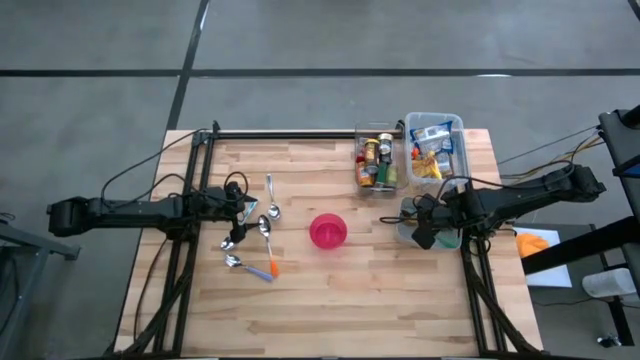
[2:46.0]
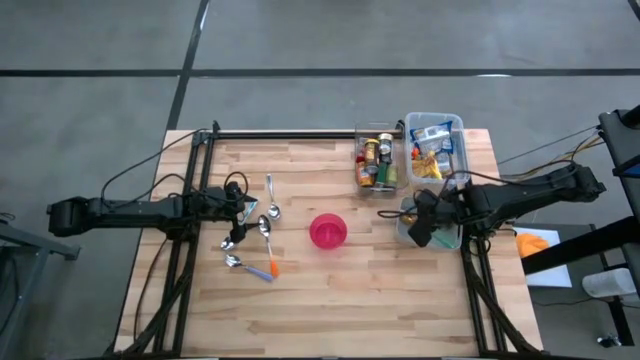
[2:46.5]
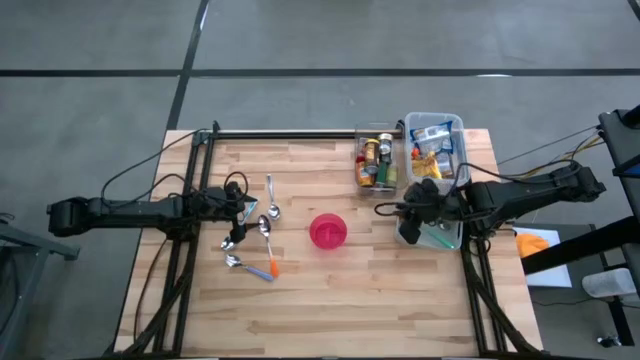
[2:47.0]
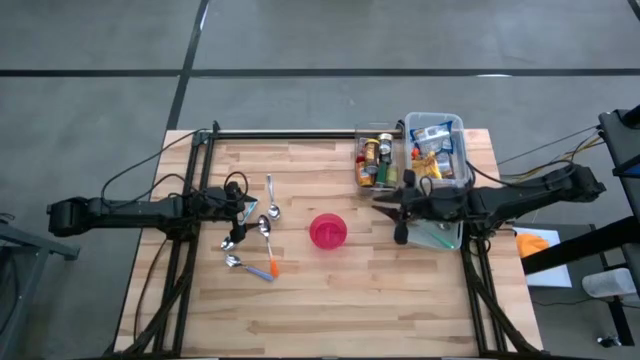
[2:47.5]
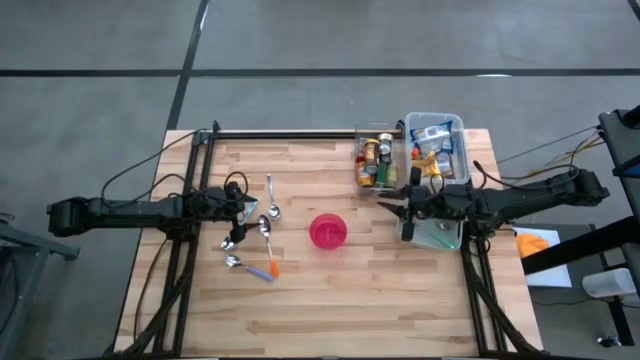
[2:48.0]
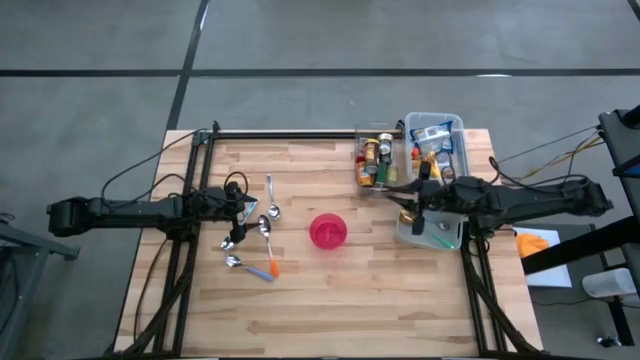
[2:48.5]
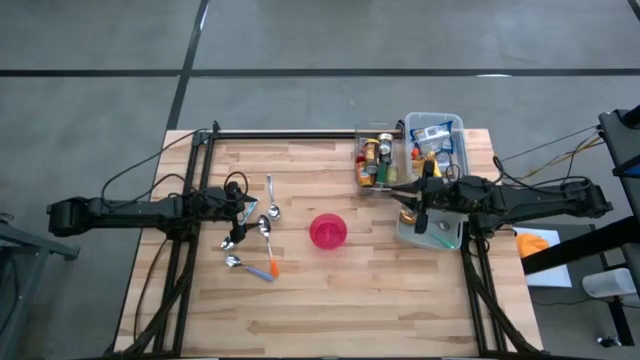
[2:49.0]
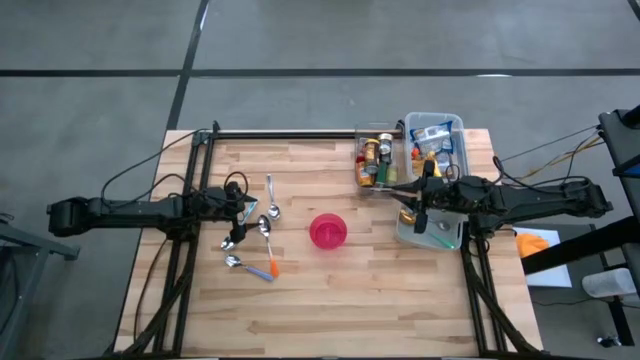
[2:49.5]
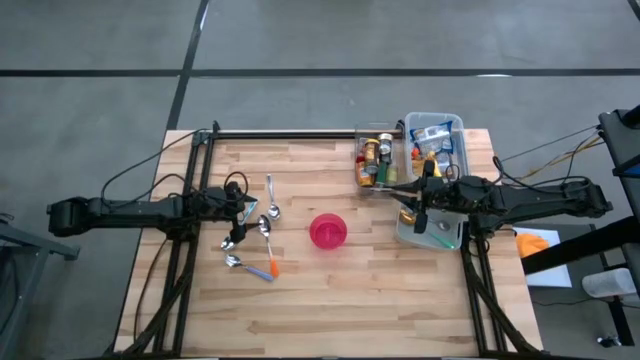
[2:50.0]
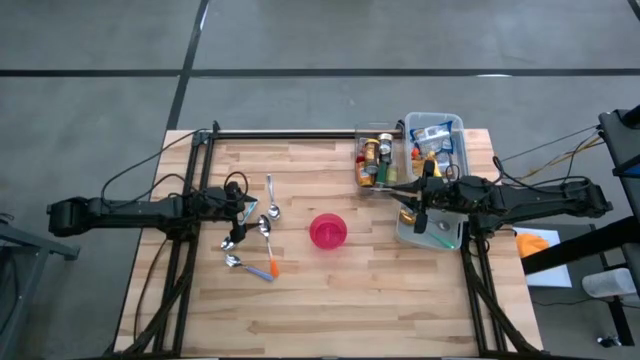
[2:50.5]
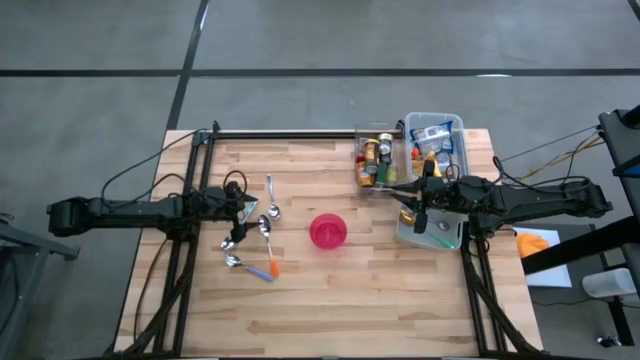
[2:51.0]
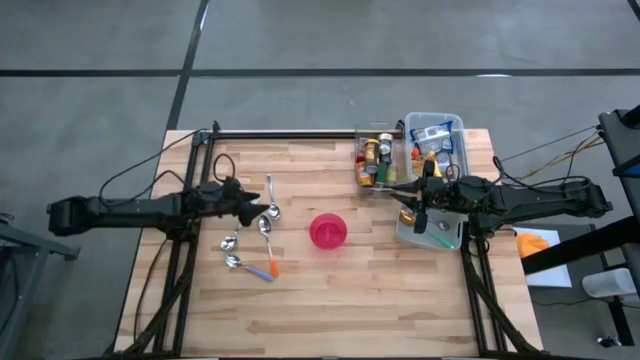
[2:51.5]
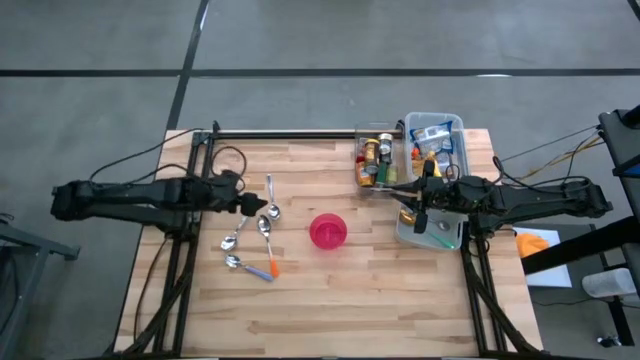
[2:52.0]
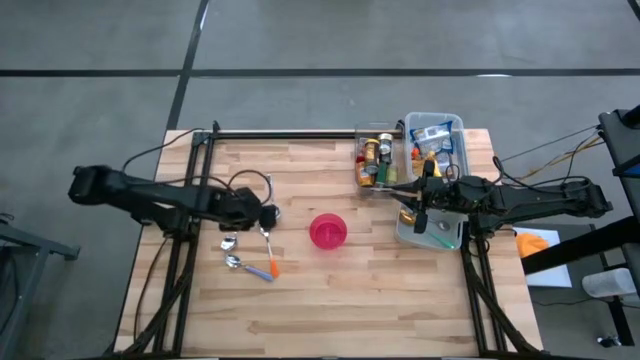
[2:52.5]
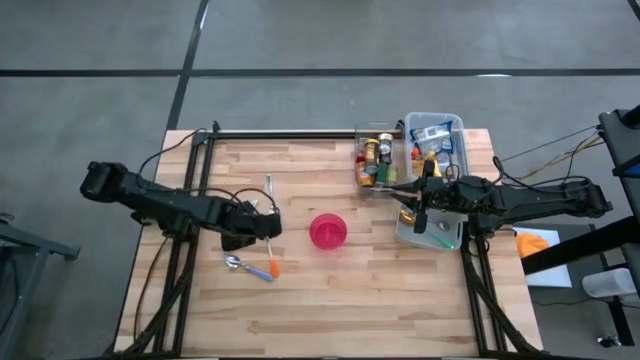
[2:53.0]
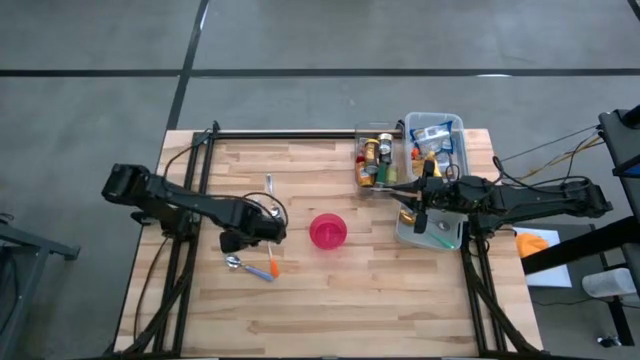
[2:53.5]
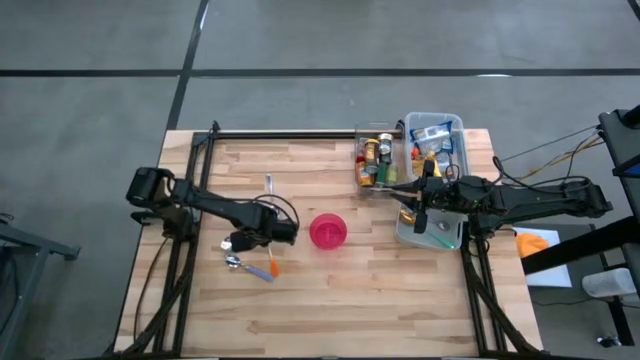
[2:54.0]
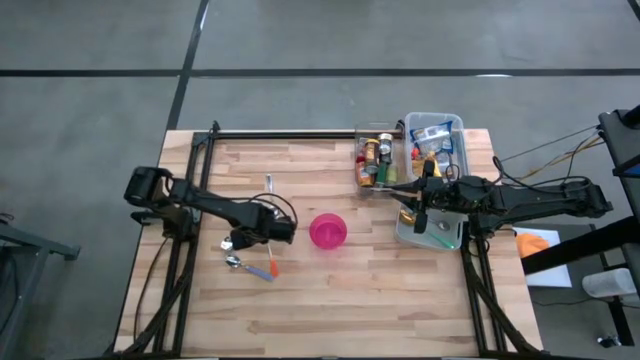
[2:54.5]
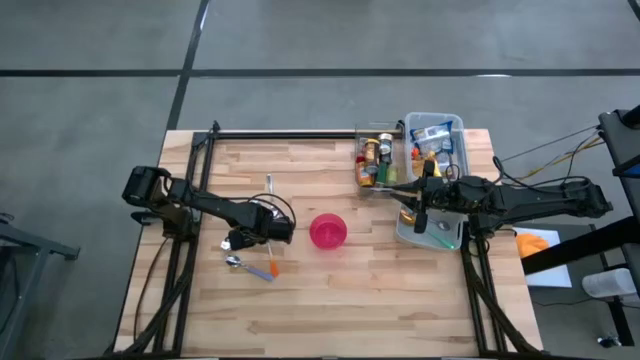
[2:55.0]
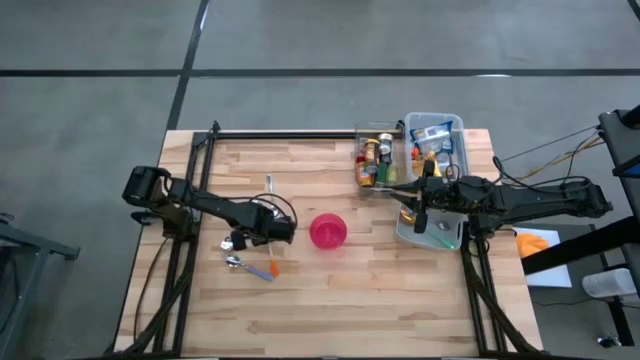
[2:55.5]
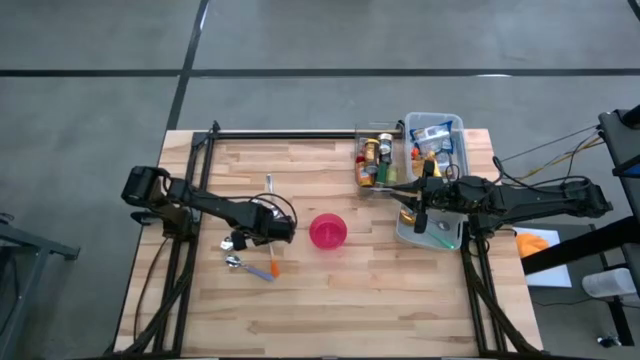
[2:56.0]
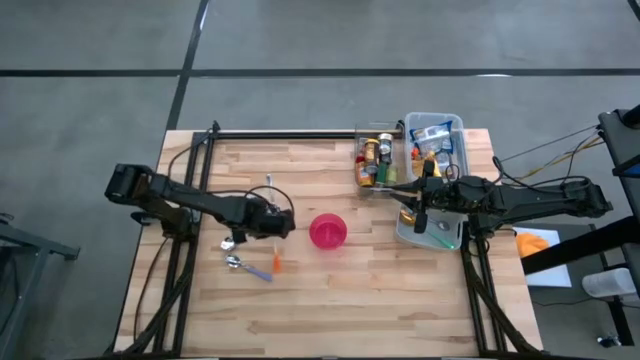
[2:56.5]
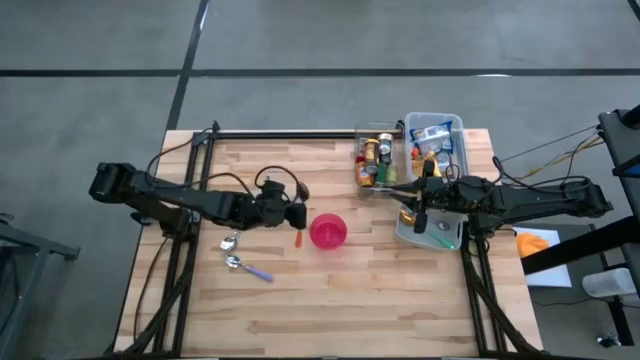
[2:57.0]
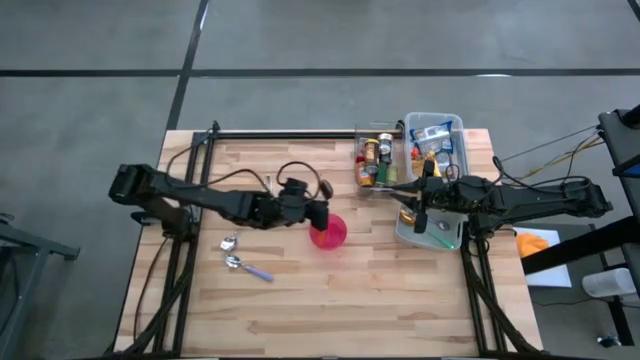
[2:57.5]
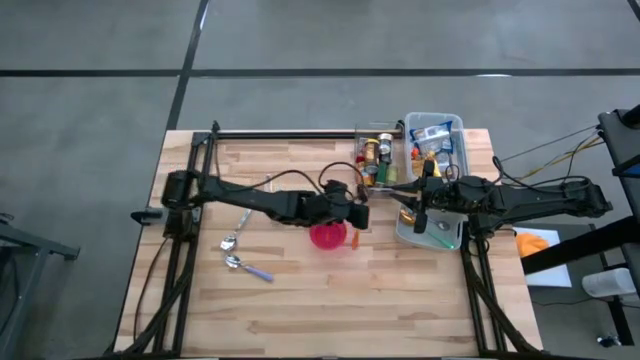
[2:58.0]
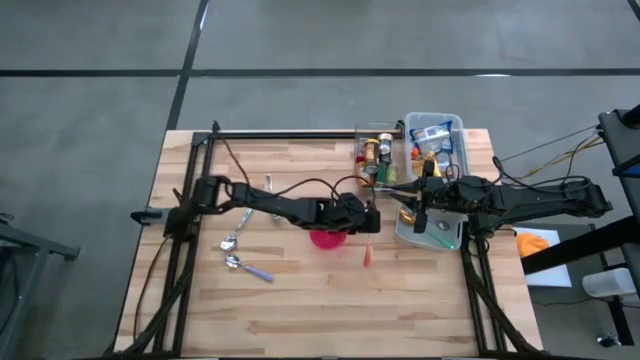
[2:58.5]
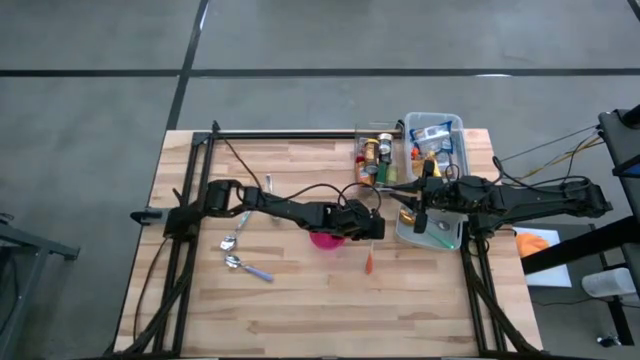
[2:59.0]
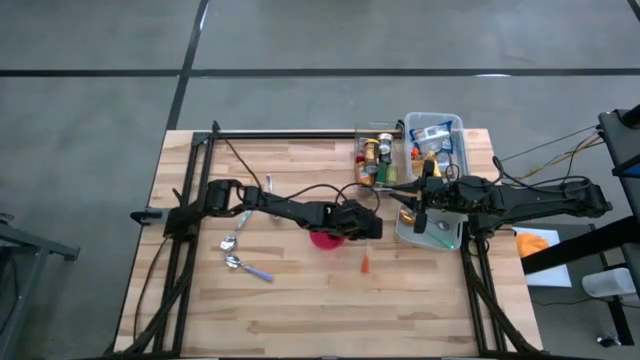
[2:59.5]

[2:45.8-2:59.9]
Put the orange spoon into the gray bin
